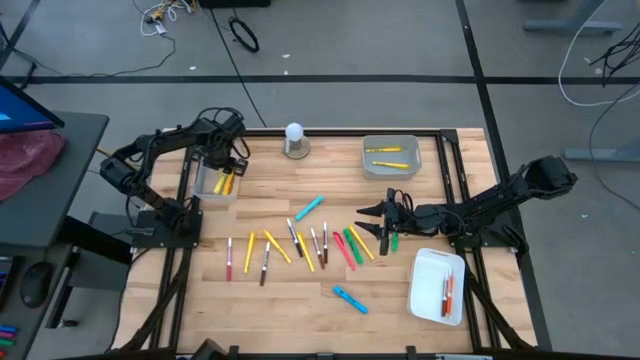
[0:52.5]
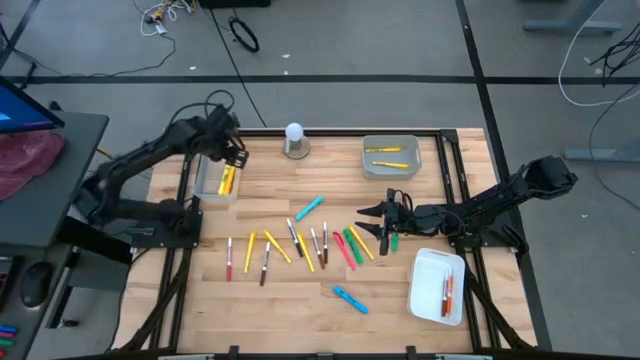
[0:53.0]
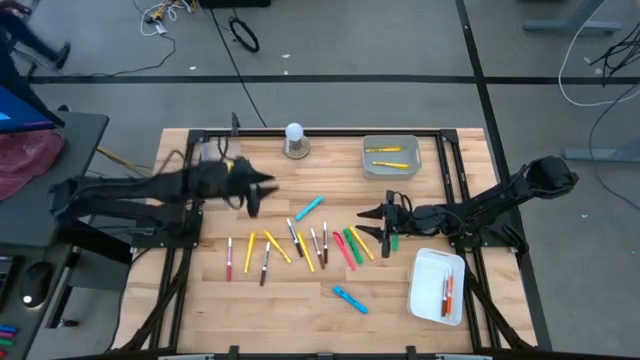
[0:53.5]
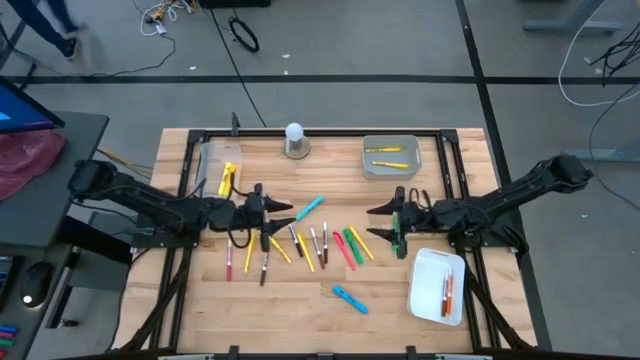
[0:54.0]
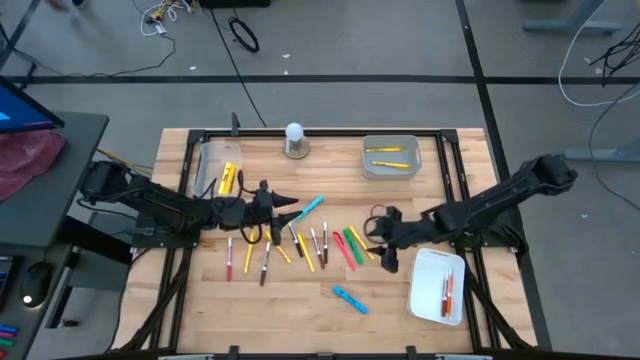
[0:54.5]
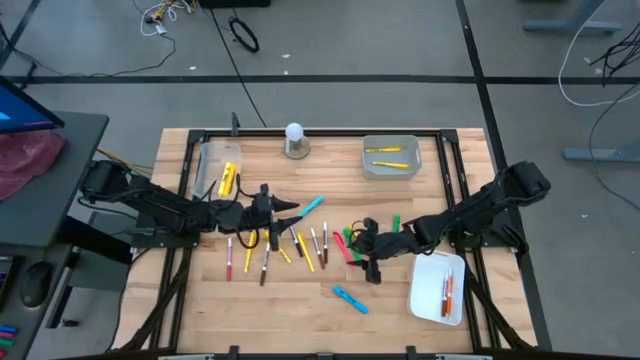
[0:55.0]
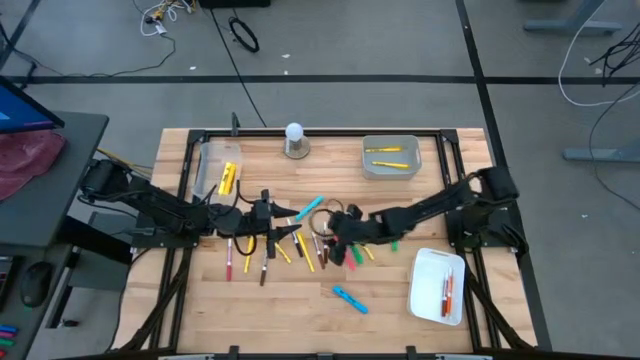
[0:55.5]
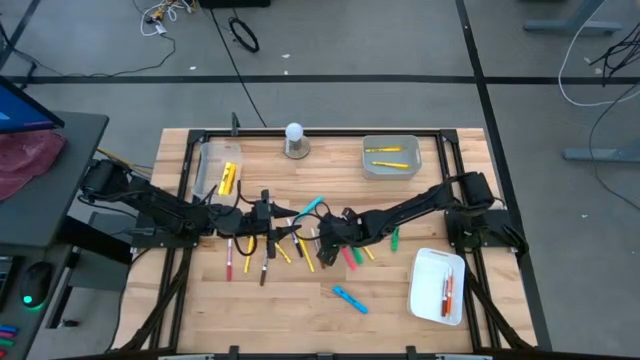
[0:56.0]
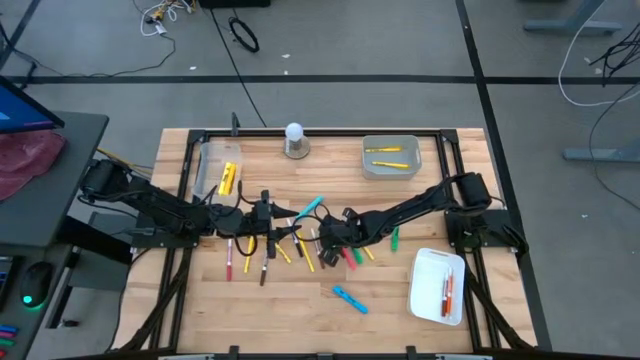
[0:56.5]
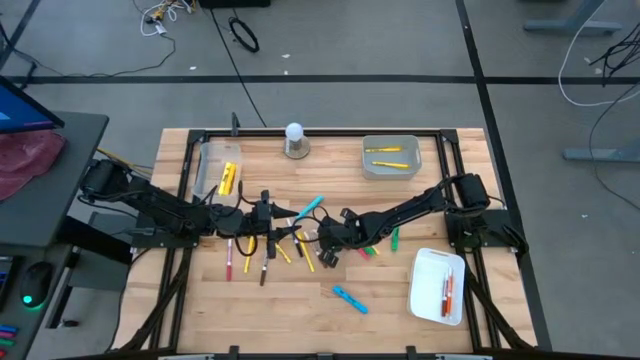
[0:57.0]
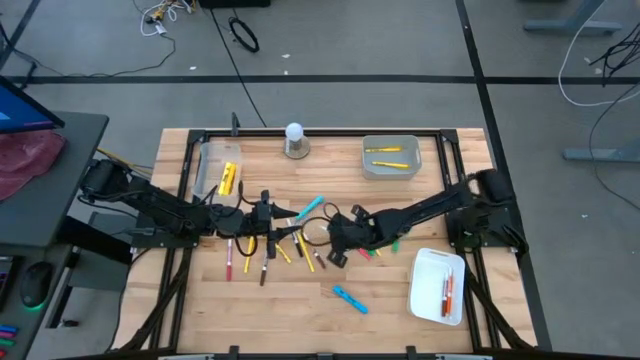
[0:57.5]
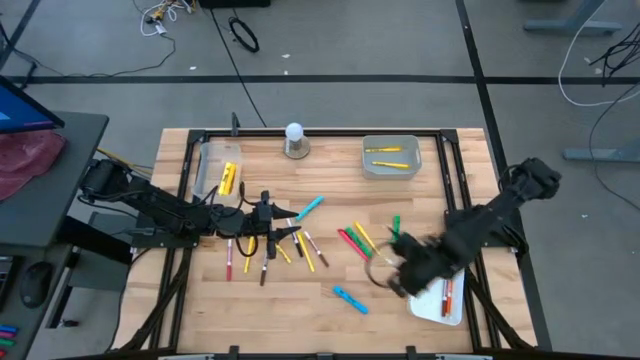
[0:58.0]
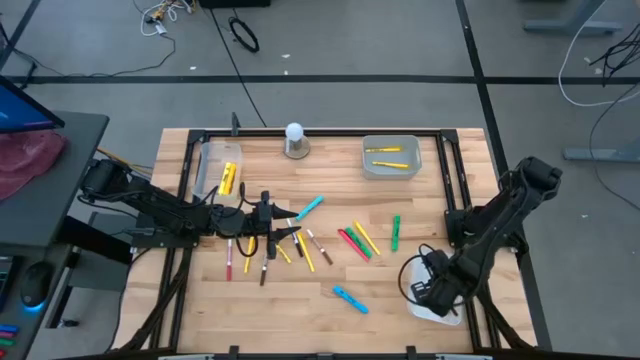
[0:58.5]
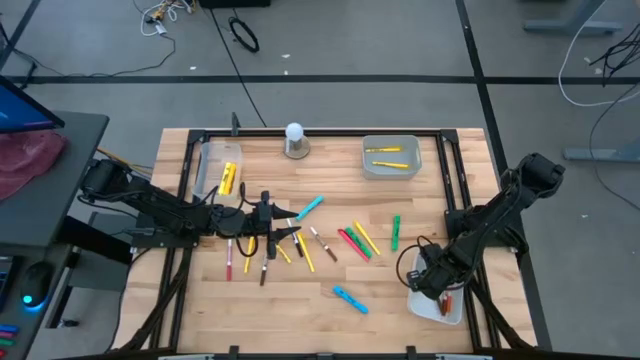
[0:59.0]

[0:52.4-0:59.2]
Task: Pick & Place Markers
Put the brown marker into the white bin

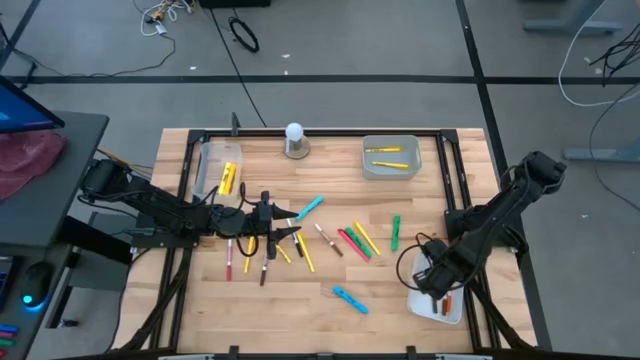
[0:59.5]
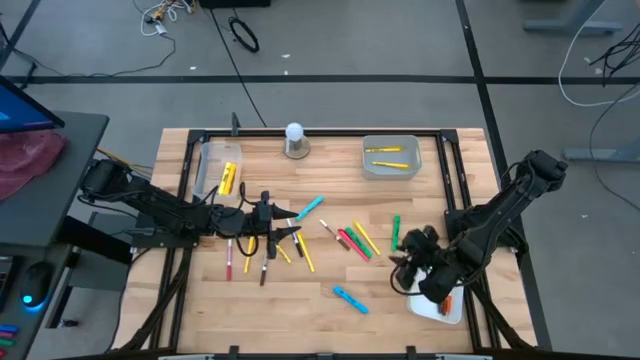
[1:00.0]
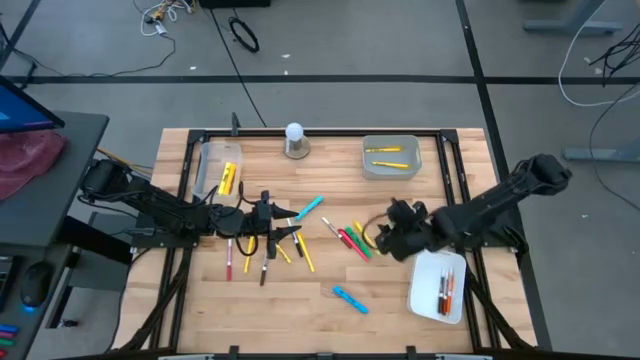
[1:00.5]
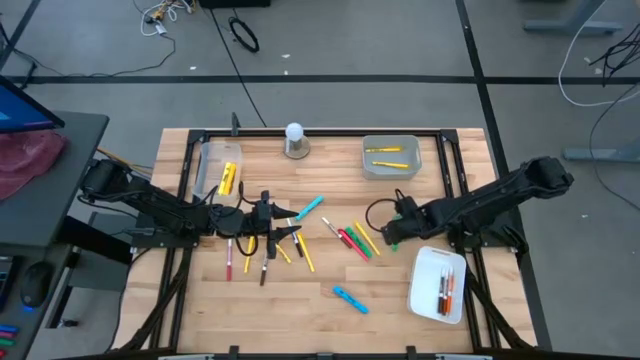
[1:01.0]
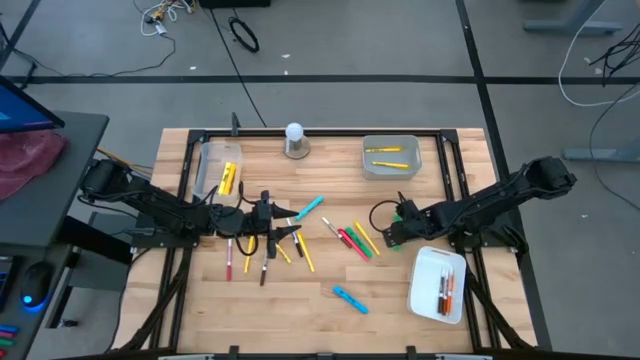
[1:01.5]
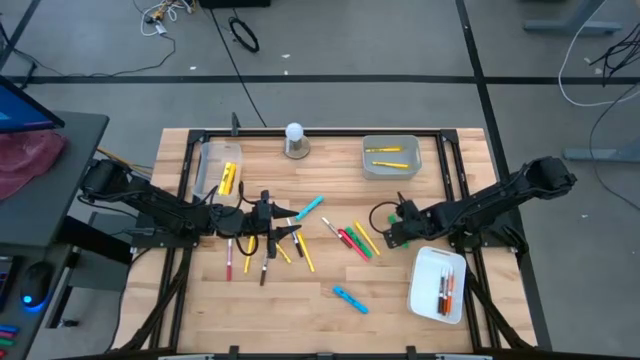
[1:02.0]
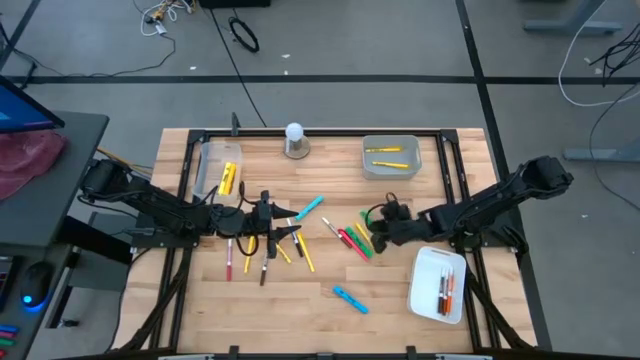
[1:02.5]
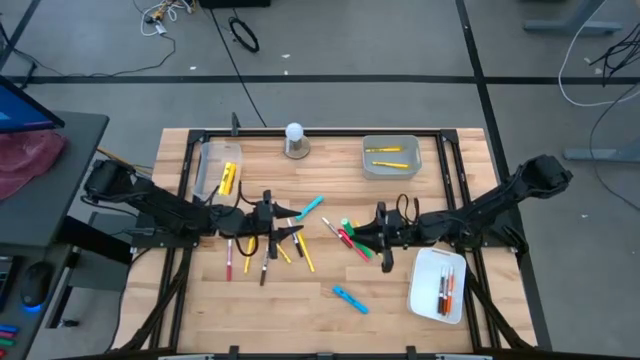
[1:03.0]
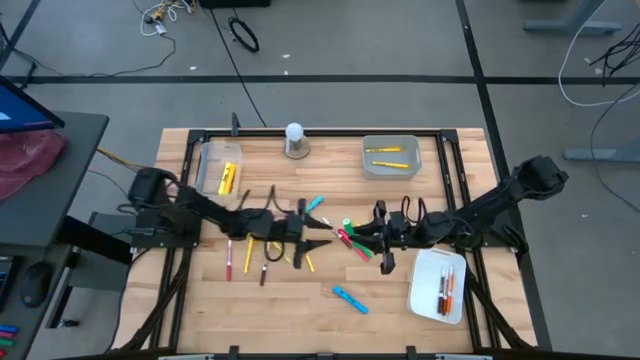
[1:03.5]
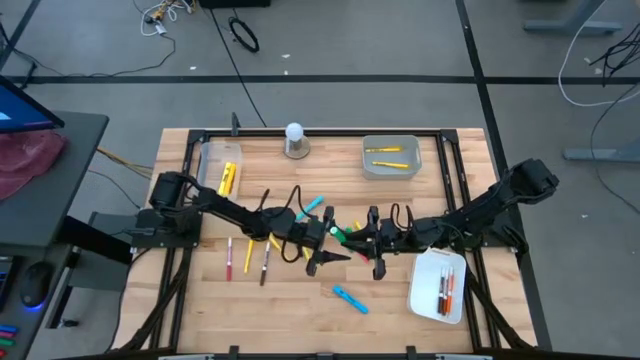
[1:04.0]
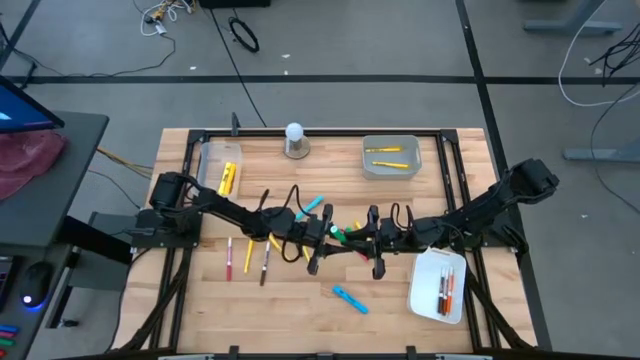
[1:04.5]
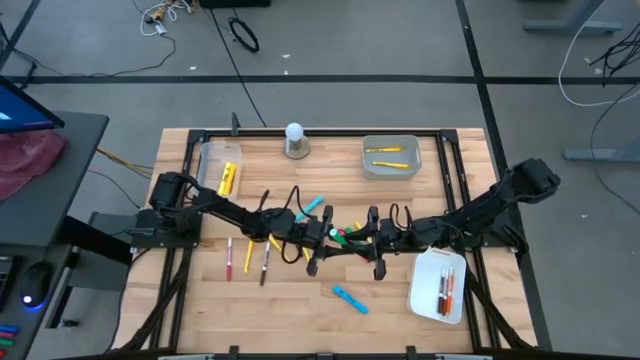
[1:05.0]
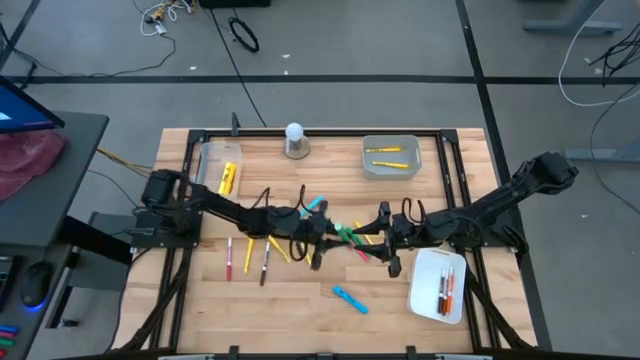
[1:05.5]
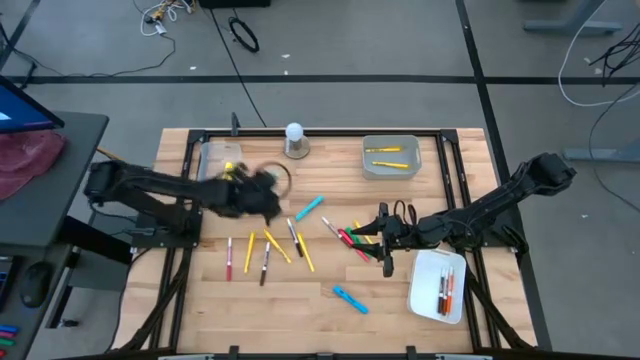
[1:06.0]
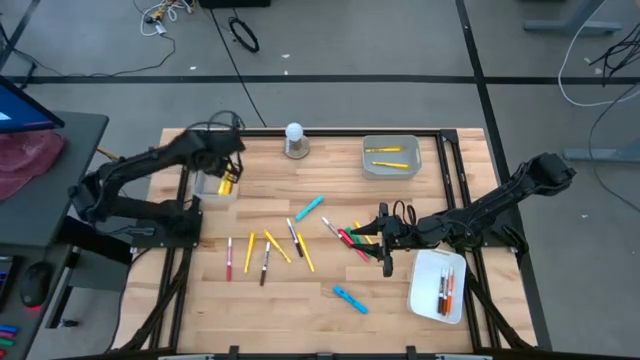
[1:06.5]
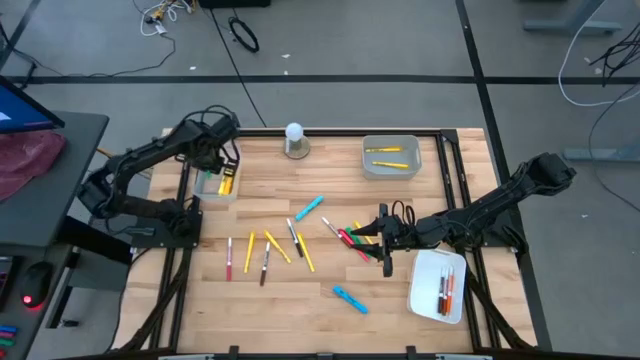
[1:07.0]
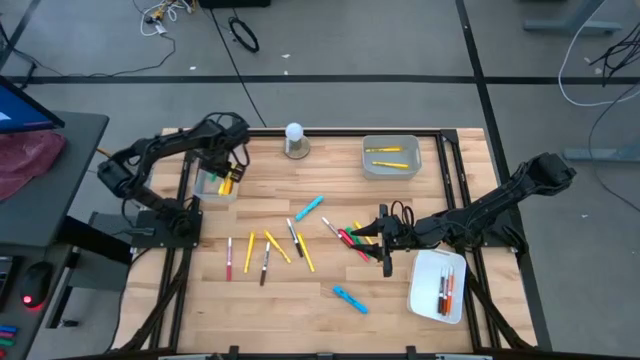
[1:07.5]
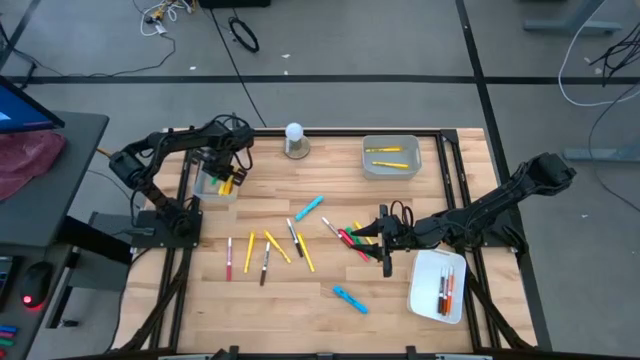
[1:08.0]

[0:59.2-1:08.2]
Put the green highlighter into the transparent bin

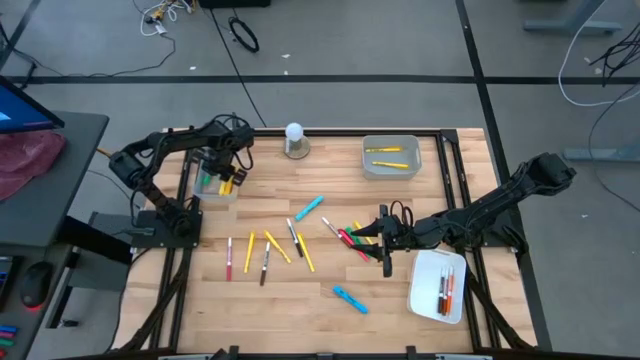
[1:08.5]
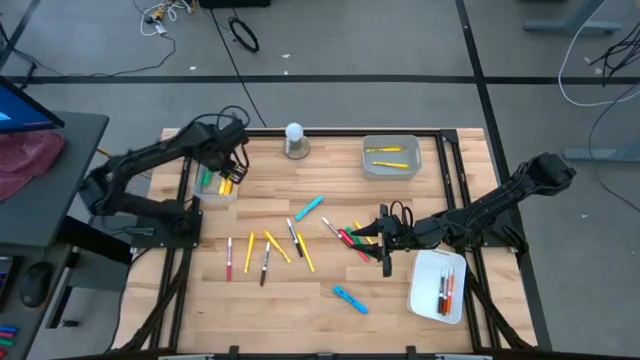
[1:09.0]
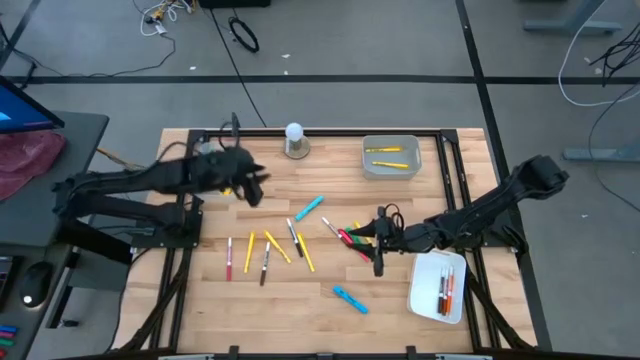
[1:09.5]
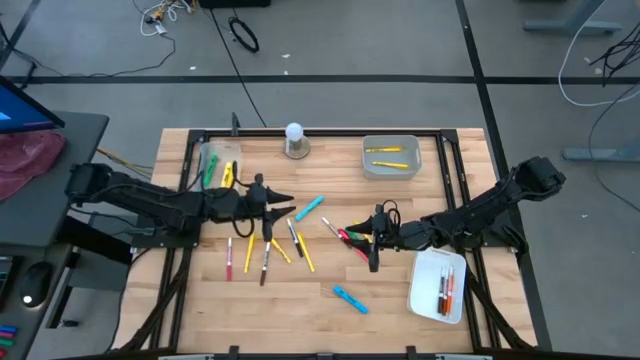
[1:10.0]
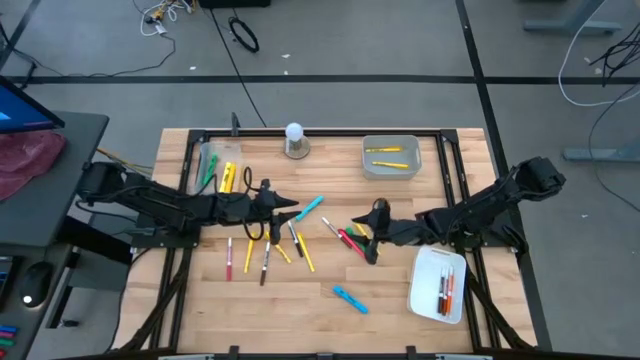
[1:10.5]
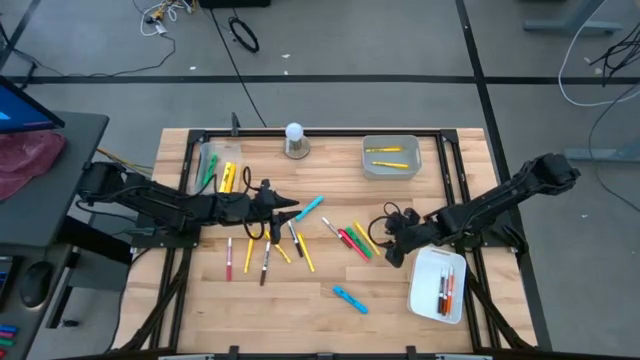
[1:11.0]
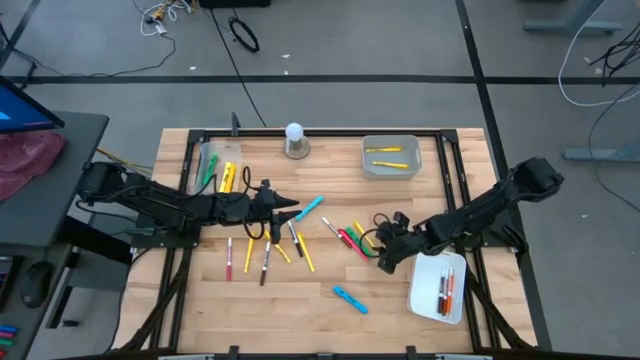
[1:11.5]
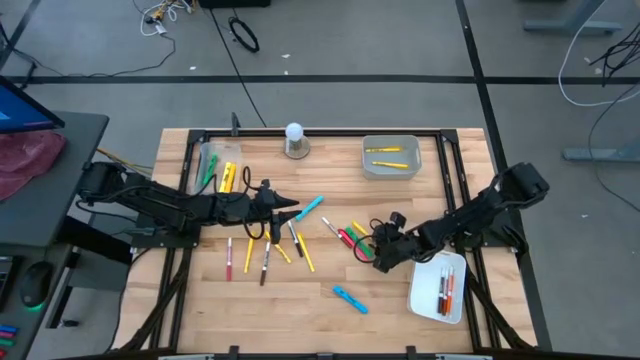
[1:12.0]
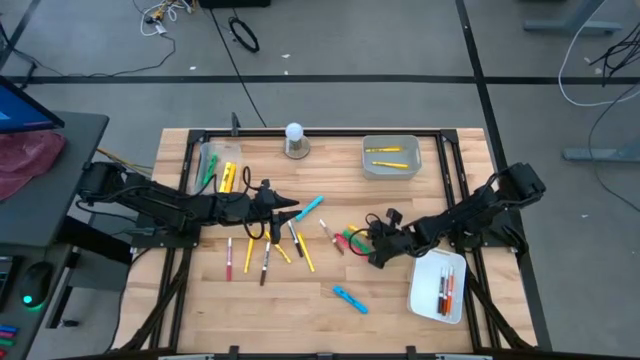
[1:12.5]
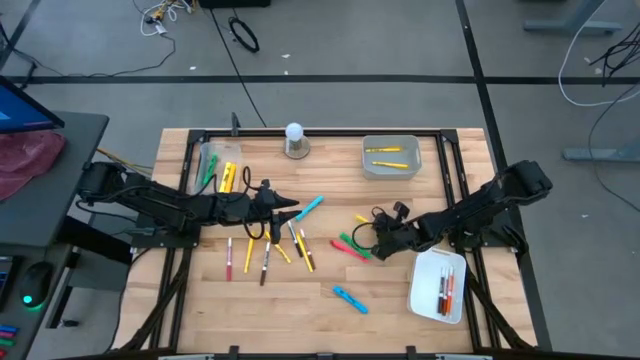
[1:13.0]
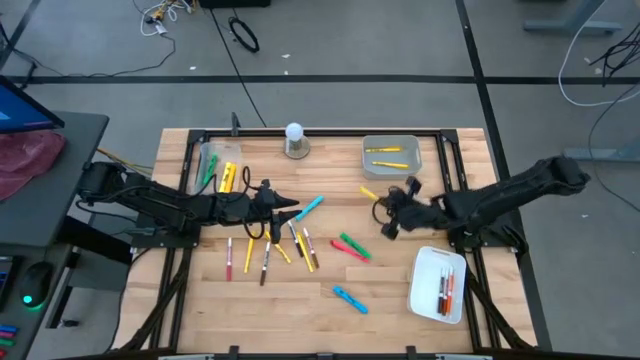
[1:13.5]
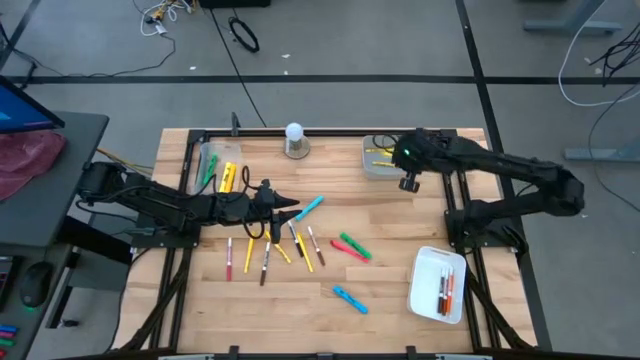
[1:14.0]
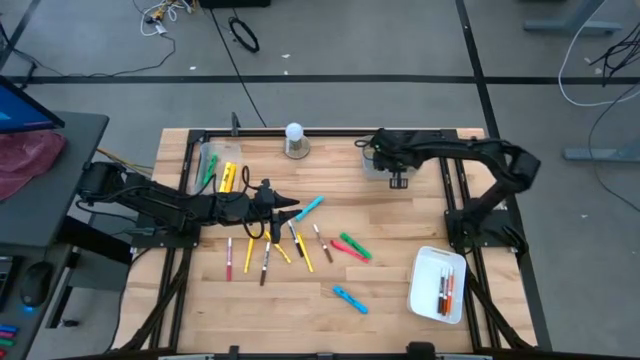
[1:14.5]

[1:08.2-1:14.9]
Put the yellow pen into the gray bin
